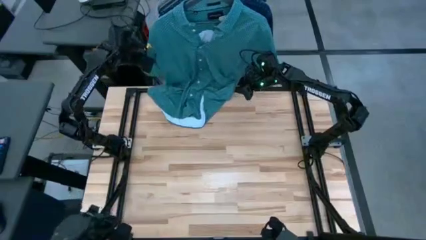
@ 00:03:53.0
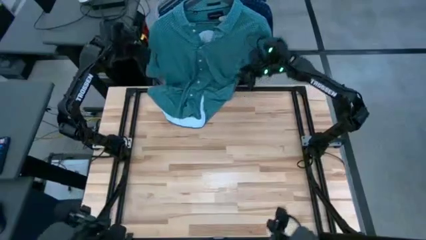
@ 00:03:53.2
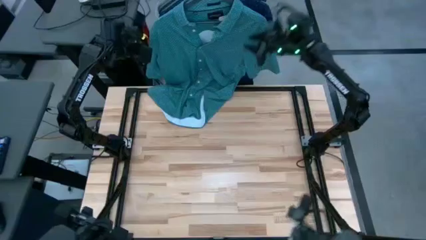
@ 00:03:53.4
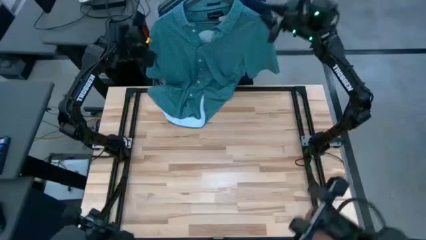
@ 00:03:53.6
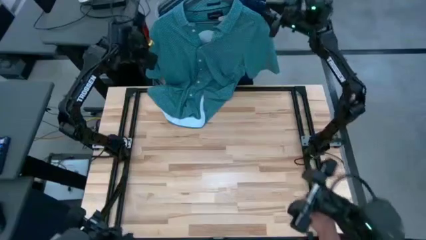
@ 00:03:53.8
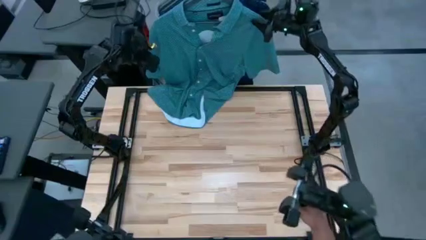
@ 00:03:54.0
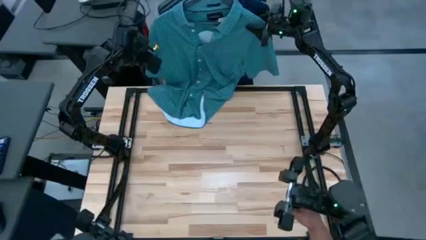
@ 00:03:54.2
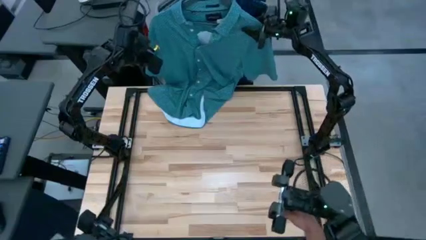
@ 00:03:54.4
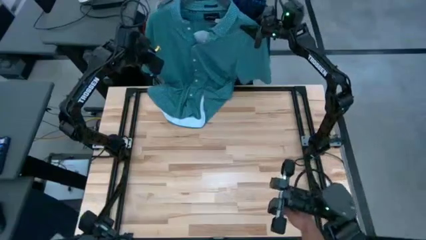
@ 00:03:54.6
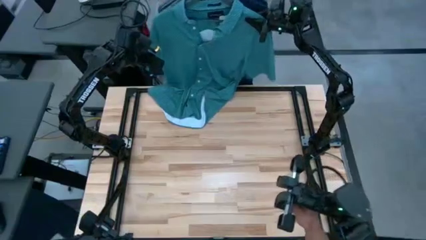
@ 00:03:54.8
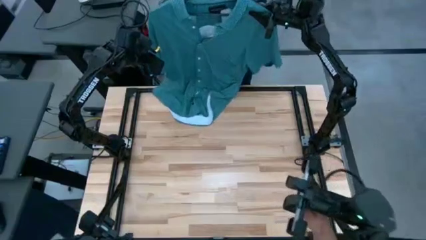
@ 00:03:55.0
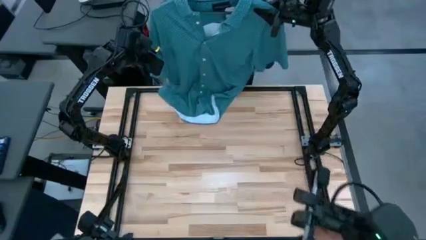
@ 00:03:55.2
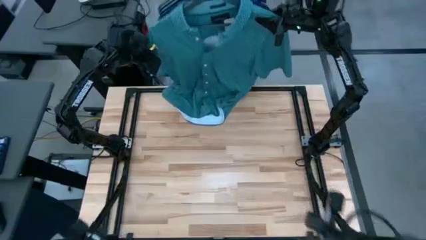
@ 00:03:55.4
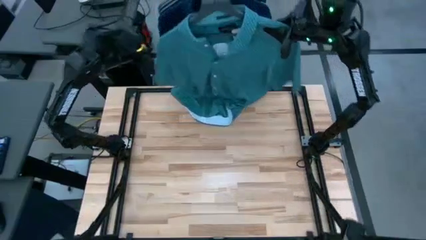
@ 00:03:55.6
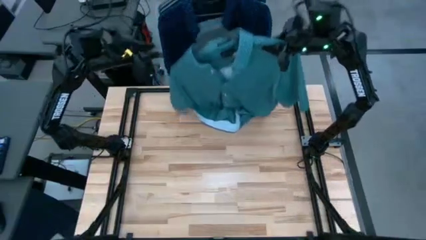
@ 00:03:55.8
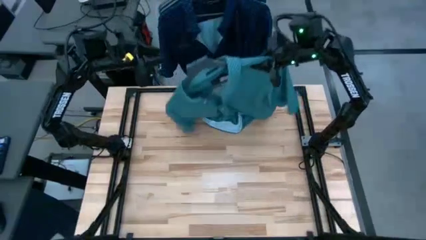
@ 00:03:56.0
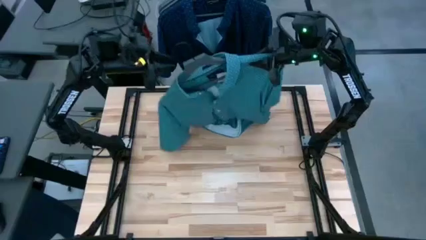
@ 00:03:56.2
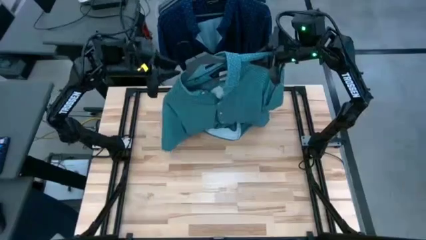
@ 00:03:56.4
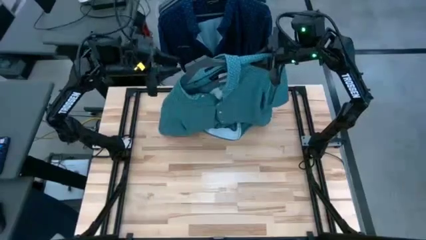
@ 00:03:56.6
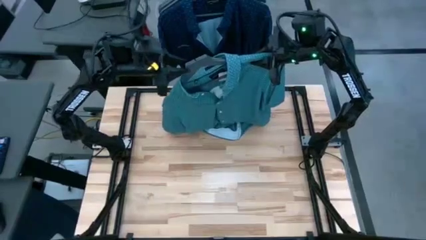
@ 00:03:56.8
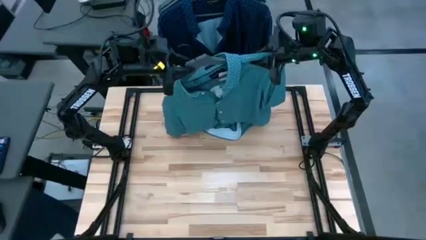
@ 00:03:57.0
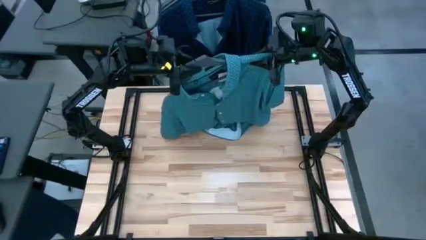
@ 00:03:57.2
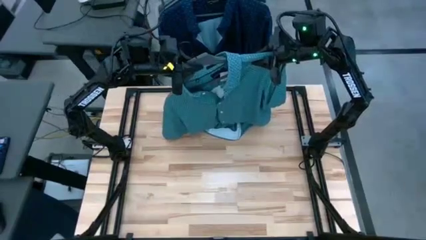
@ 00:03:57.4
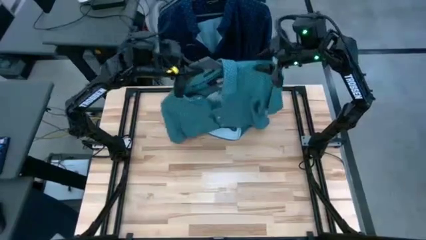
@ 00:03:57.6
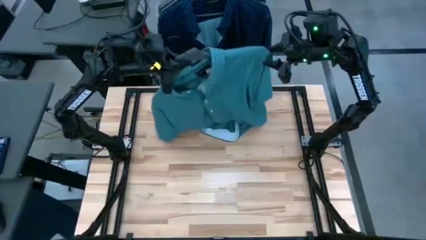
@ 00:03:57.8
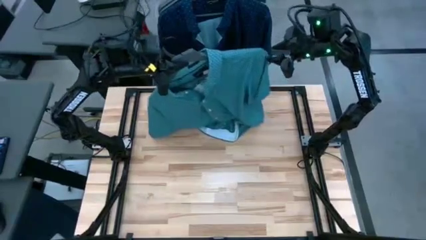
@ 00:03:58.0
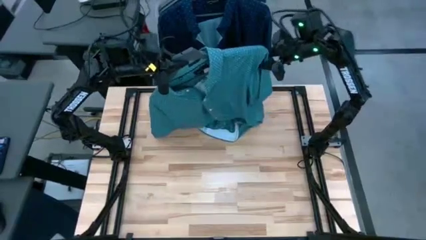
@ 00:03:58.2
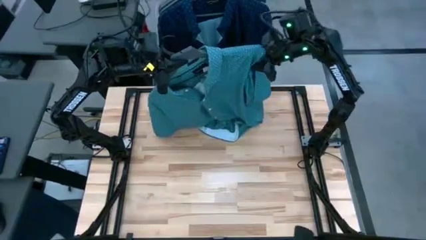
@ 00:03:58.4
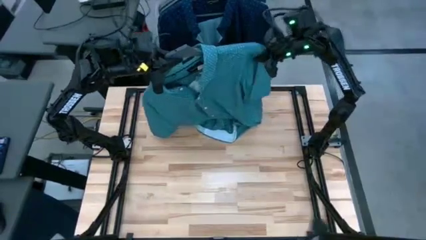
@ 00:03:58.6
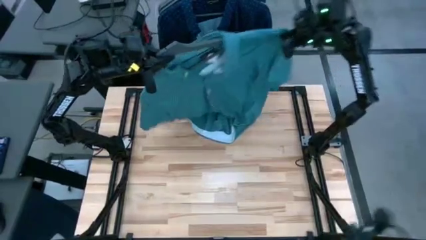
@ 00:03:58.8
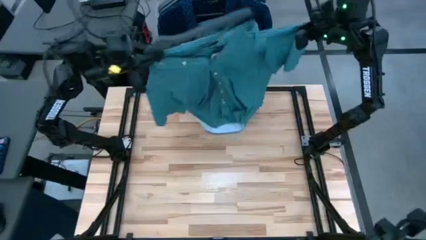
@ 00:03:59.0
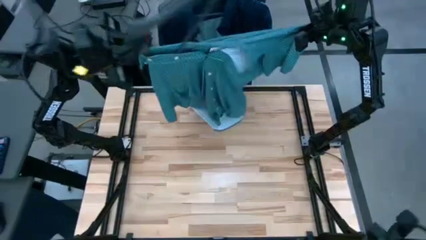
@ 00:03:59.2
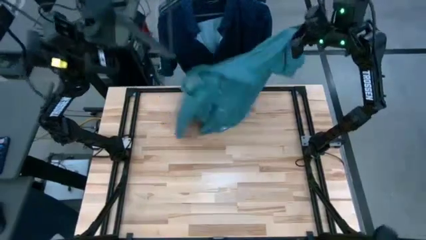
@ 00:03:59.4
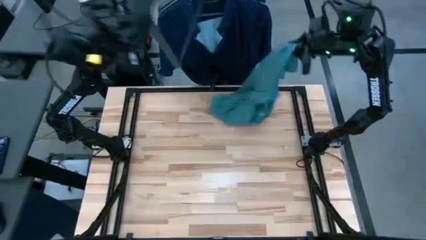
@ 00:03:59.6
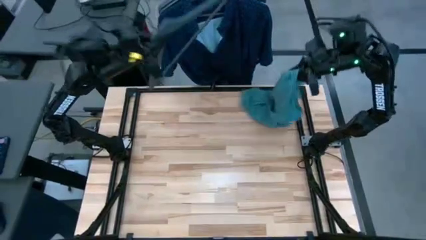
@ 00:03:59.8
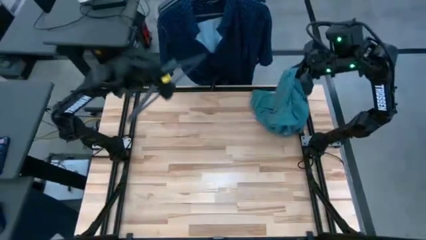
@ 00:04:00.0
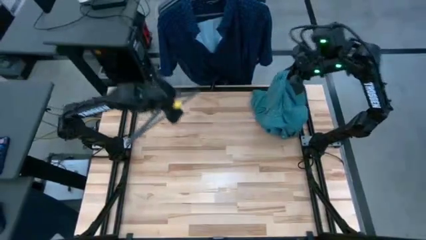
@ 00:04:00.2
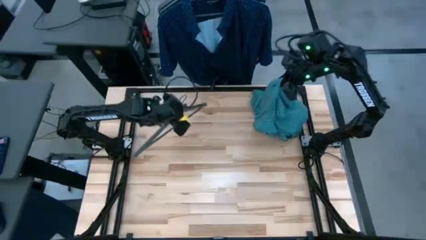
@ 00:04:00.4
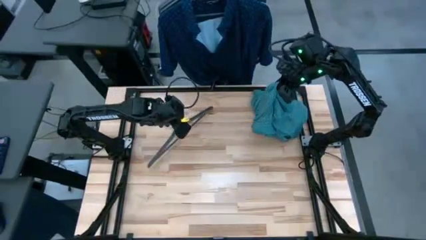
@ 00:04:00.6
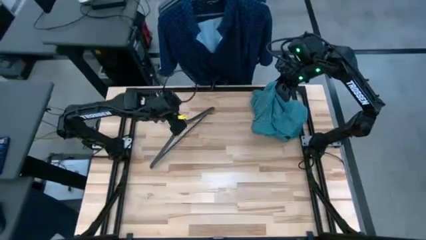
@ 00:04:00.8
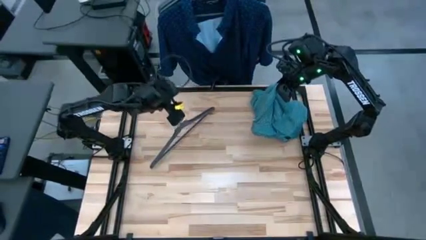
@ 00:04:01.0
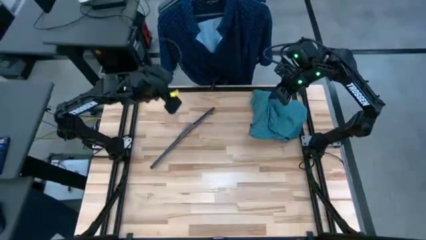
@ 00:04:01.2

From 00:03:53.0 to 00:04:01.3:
Task: Hang clothes
Unhang the green polo shirt from the rack

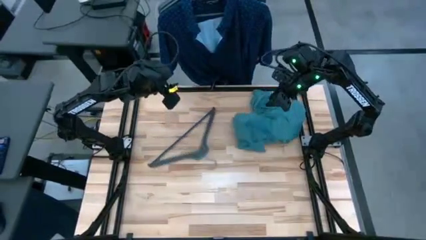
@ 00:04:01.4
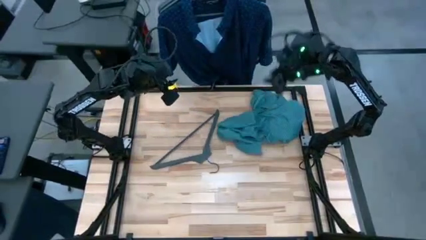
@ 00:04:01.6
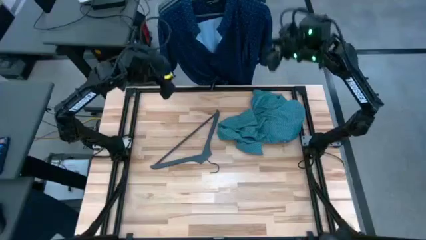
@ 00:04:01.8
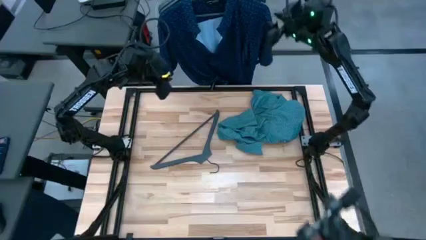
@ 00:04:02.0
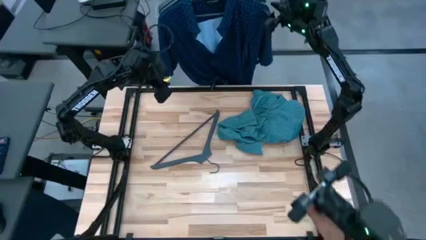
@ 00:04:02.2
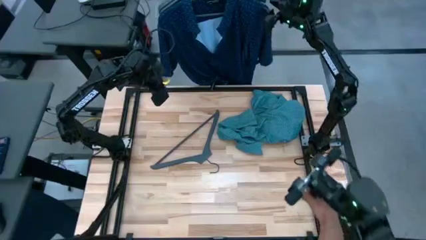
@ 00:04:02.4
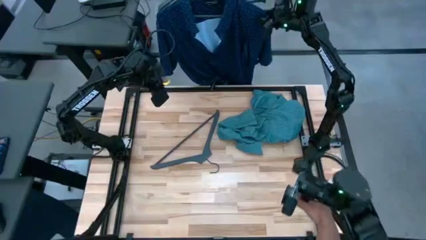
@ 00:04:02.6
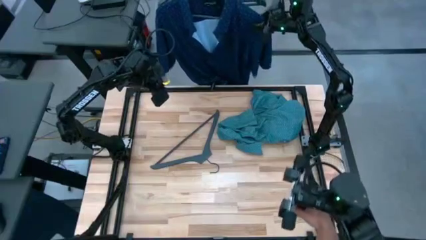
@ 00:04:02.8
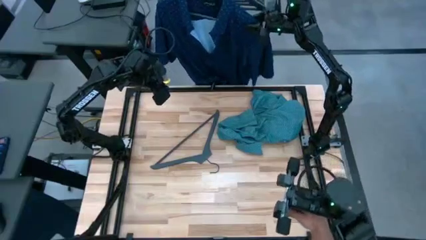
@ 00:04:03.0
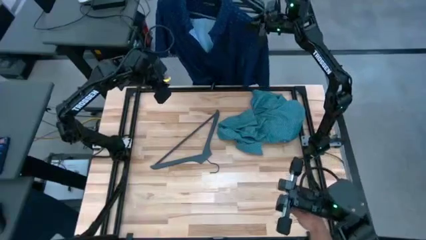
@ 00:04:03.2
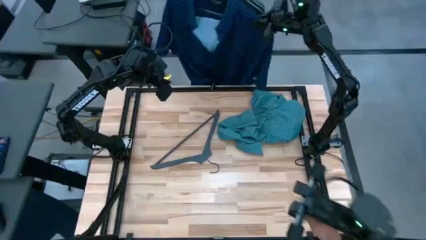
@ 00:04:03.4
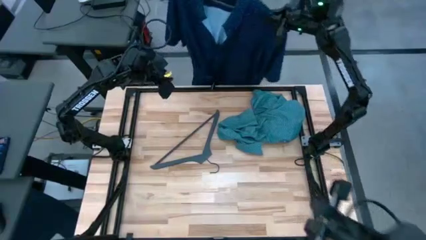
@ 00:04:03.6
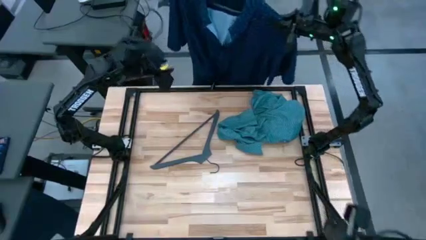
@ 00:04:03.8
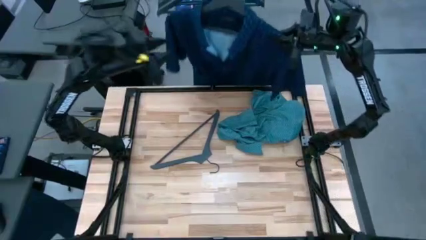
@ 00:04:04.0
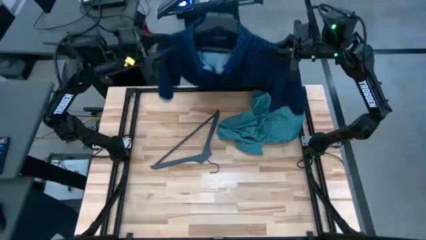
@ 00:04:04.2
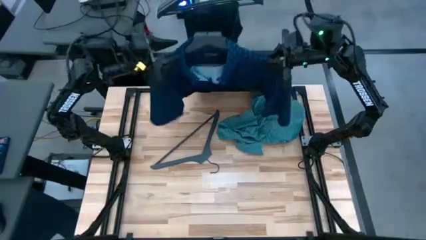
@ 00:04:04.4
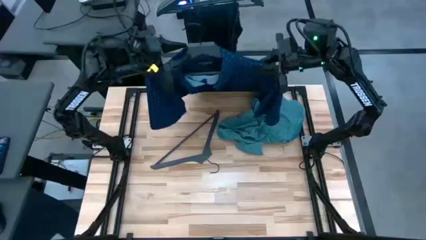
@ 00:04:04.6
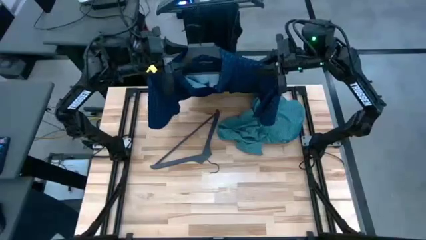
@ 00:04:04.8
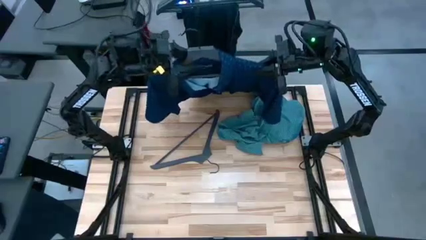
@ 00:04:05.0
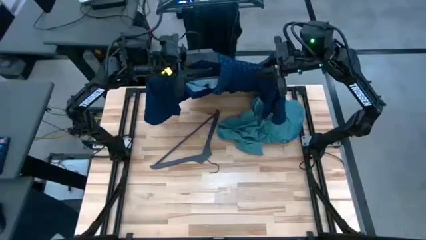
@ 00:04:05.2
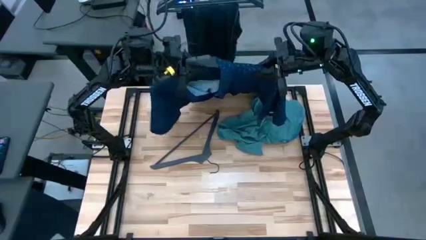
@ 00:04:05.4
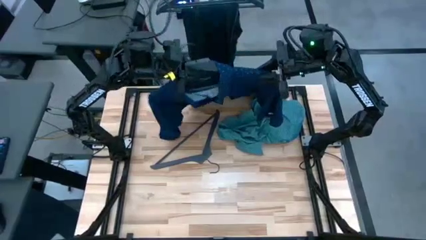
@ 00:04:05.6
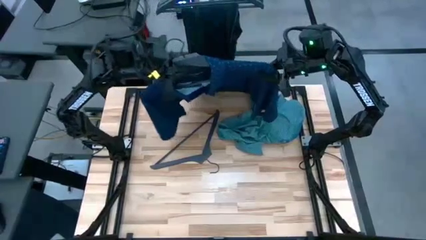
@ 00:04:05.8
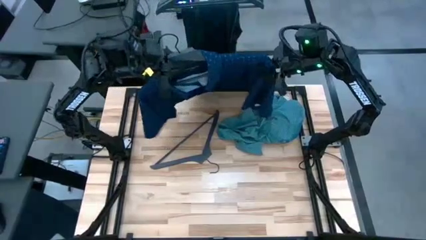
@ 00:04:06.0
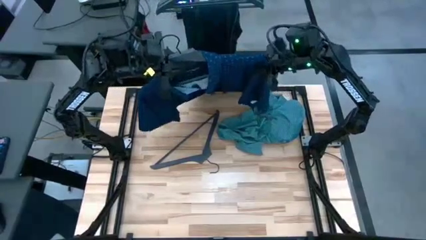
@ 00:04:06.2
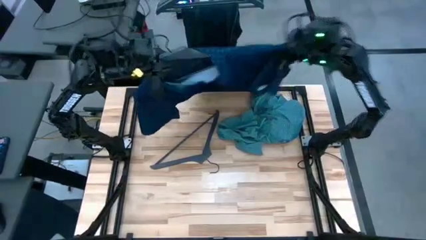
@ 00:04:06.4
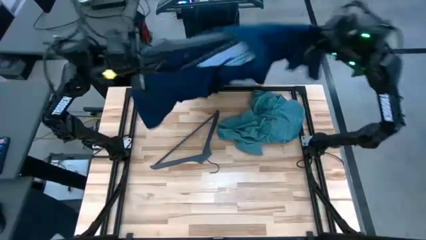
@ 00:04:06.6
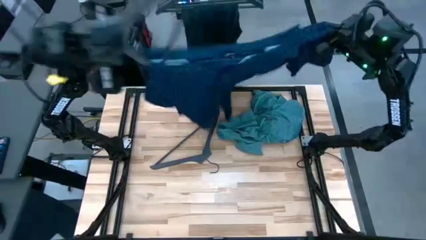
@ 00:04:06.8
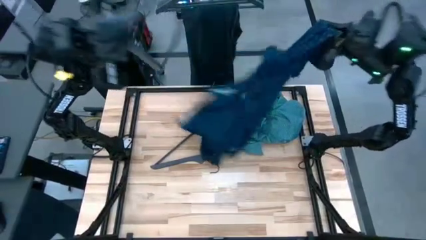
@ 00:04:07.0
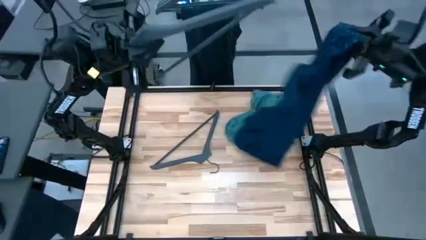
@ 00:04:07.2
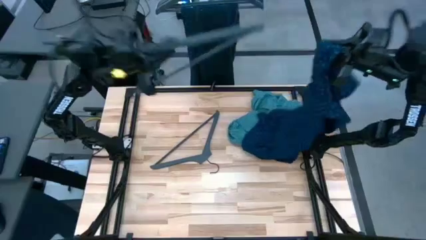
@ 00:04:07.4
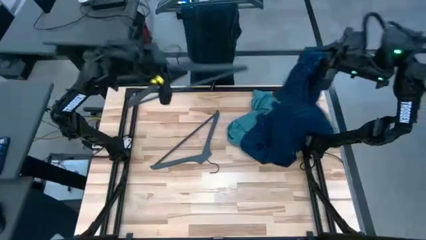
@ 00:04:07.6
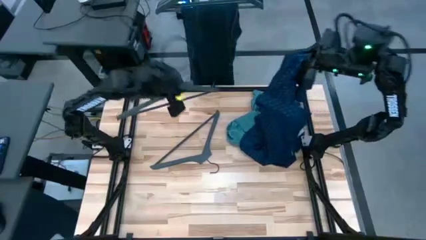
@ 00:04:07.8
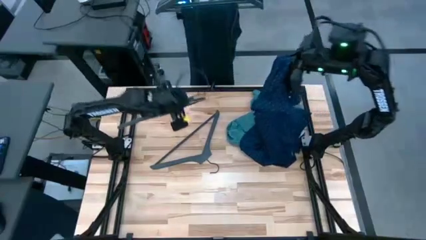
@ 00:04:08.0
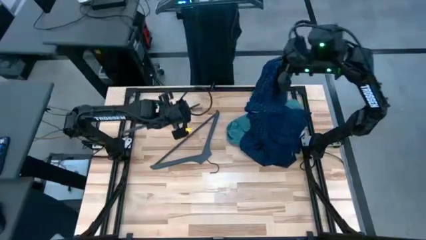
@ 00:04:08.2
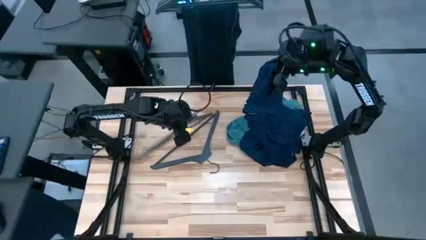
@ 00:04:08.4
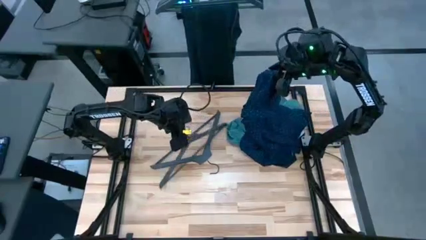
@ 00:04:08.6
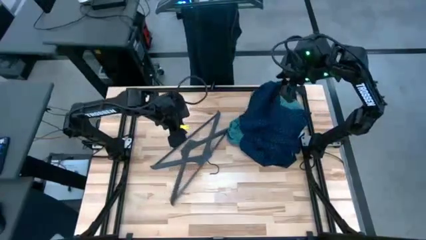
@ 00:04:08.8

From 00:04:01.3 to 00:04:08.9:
Unhang the blue polo shirt from the rack
